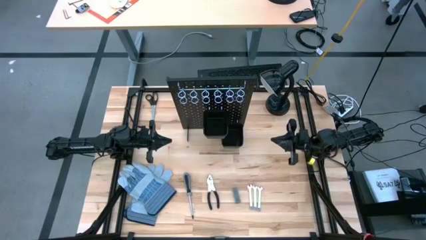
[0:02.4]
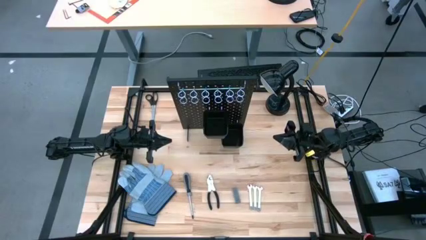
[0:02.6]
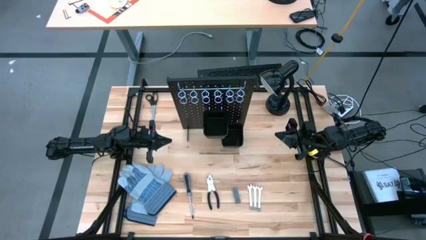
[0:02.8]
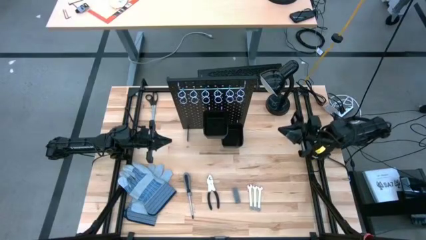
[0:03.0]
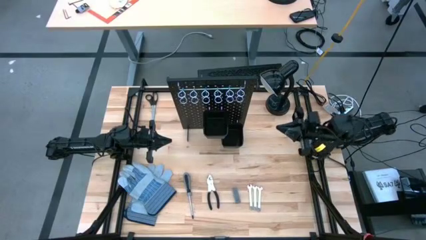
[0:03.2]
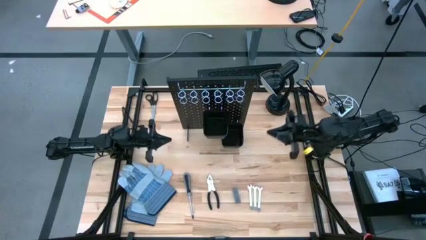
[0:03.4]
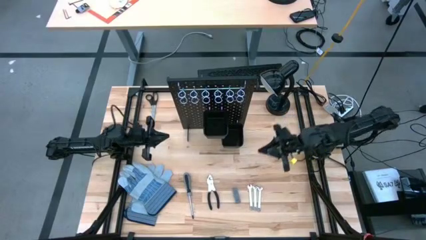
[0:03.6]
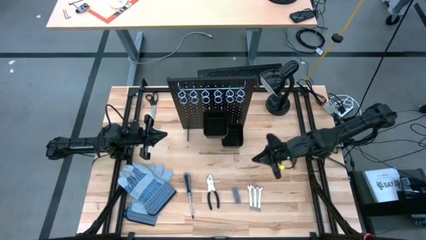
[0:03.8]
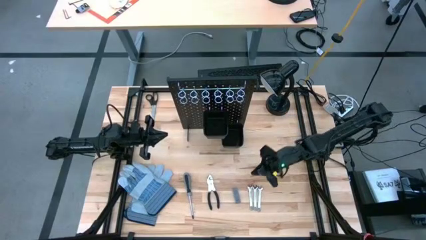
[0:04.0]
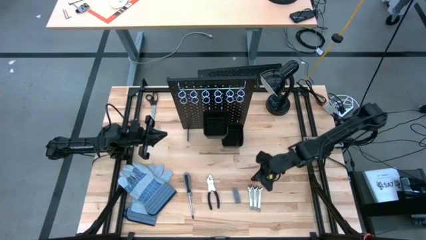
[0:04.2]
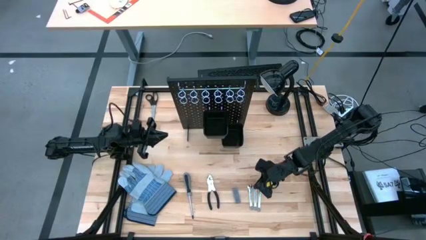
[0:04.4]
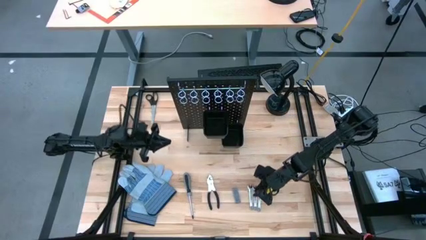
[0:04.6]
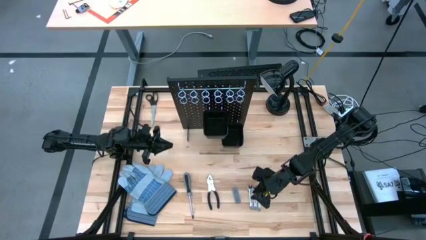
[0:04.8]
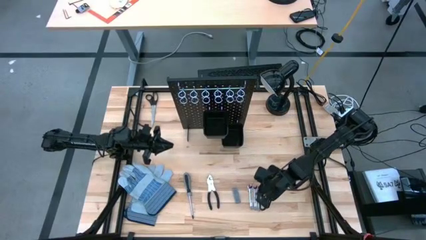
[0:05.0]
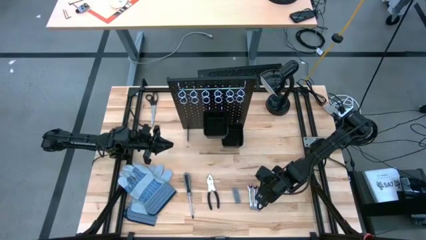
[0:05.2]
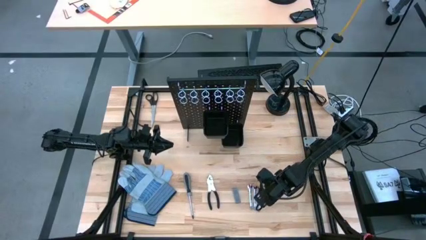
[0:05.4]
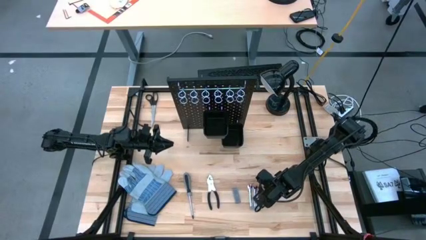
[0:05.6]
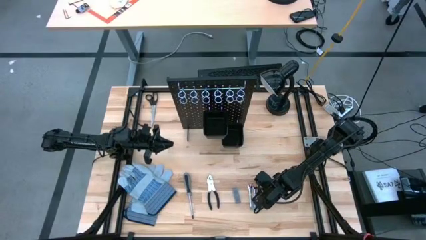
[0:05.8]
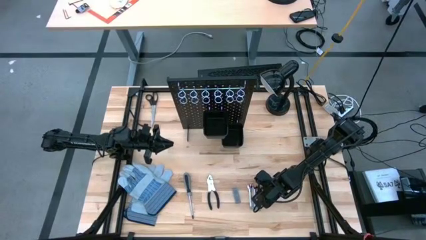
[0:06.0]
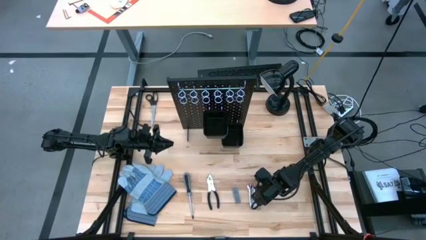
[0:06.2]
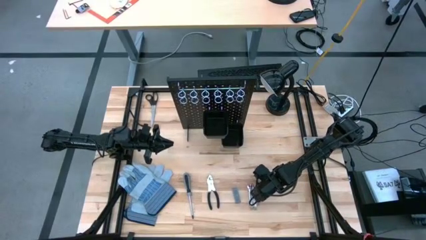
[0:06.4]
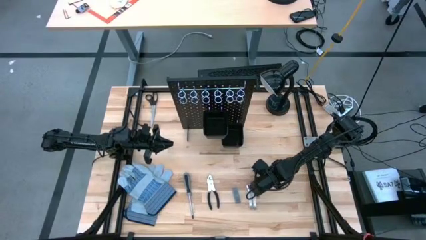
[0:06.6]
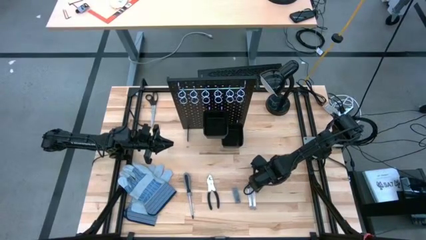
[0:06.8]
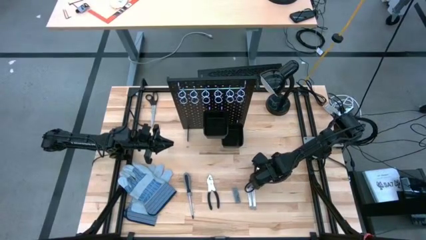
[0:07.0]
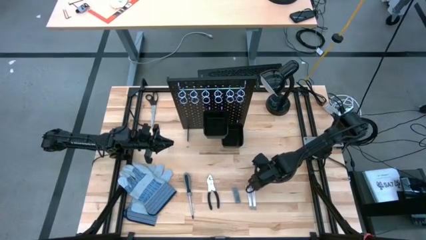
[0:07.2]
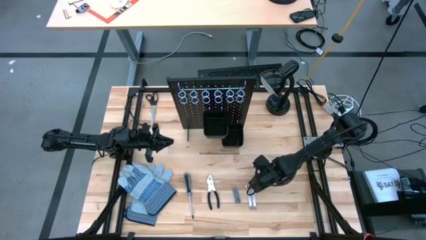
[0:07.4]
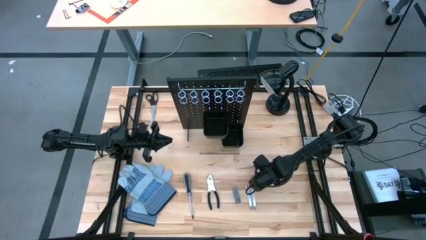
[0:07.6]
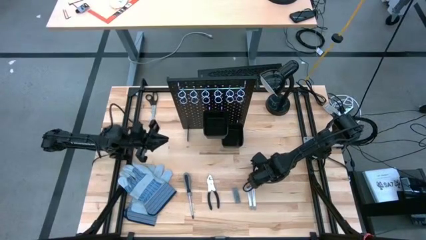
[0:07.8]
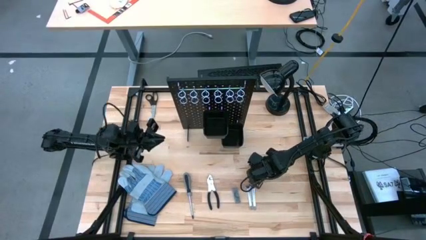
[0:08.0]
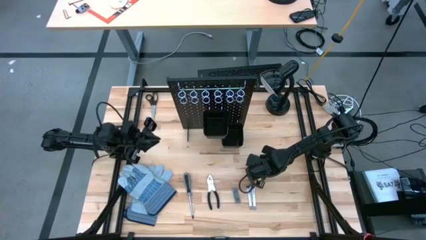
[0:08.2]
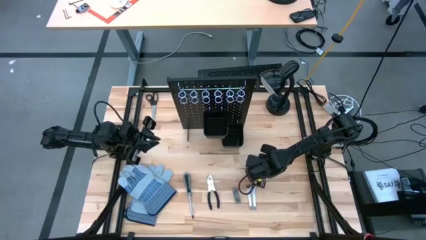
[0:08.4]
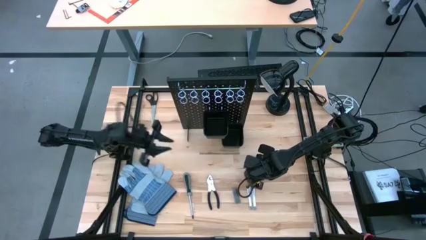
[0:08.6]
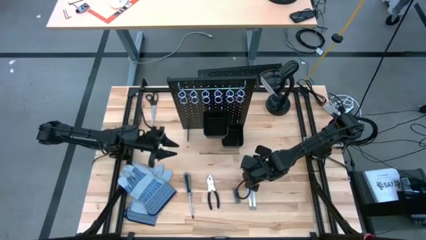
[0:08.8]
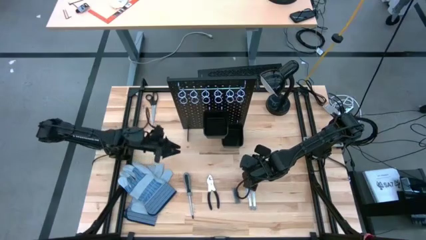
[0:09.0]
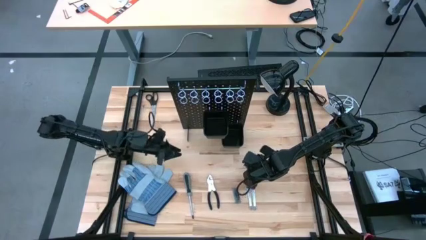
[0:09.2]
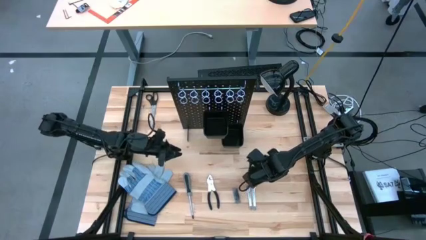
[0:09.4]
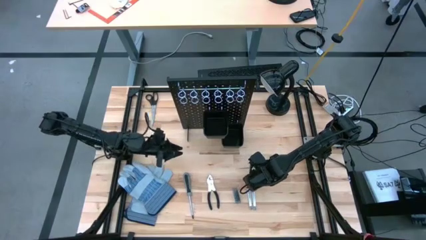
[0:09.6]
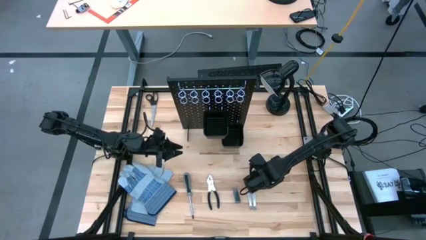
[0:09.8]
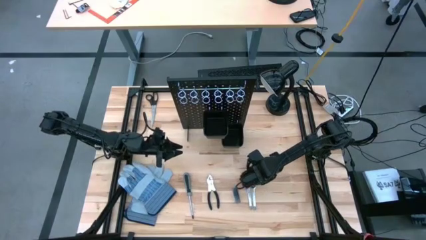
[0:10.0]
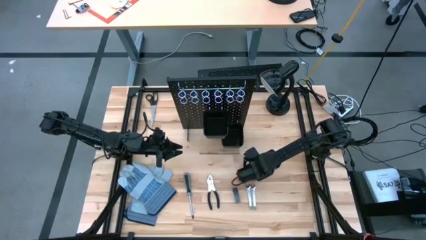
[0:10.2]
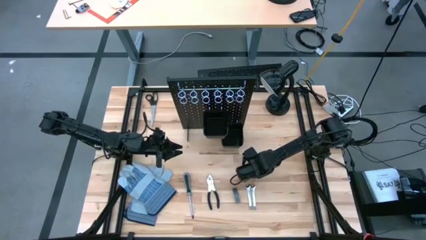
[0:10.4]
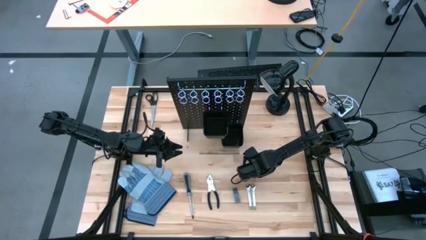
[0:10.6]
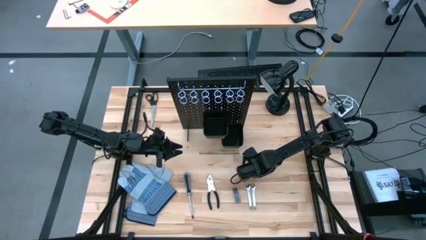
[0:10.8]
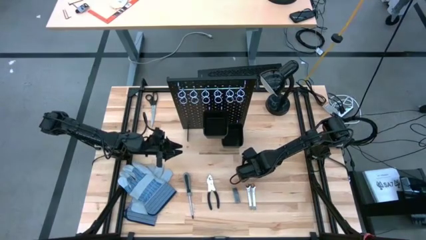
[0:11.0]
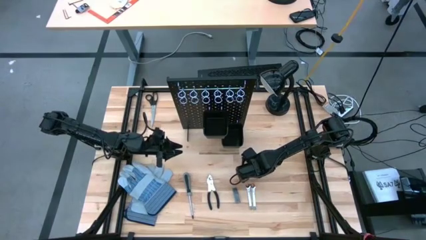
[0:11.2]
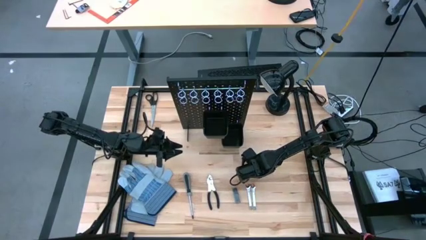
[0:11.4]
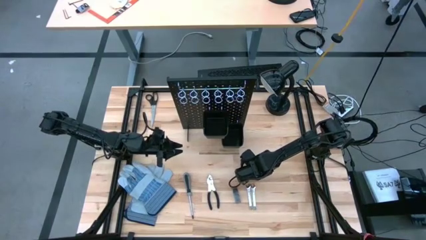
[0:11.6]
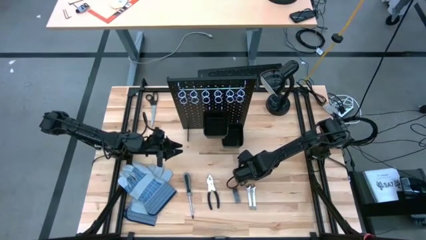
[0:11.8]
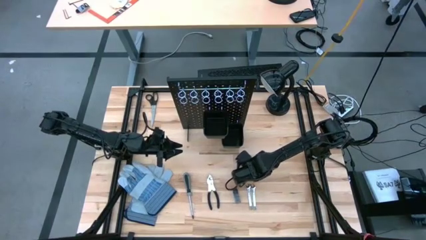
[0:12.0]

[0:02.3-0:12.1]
Task: Hang tools onto peg board
Hang the right silver wrench on the black pegboard
